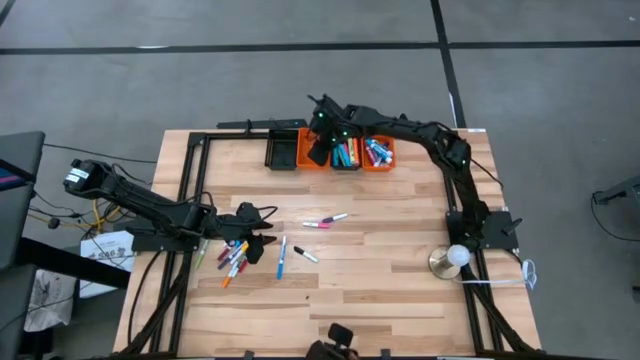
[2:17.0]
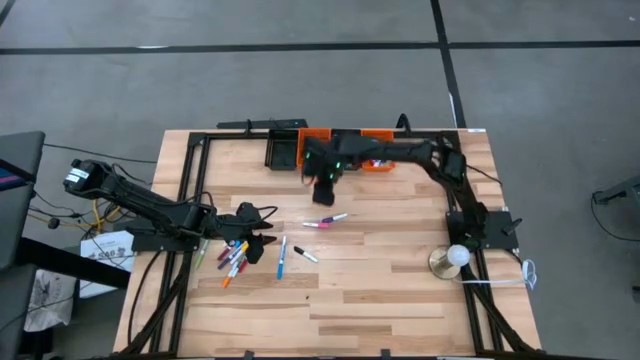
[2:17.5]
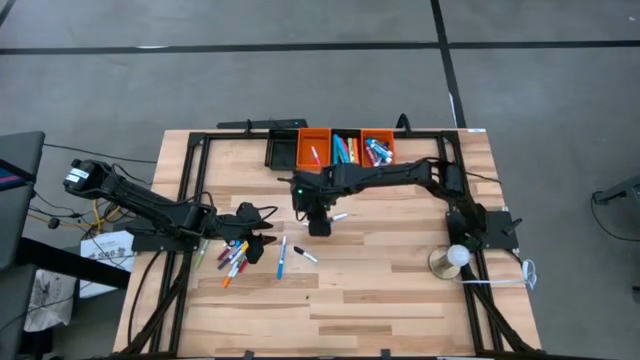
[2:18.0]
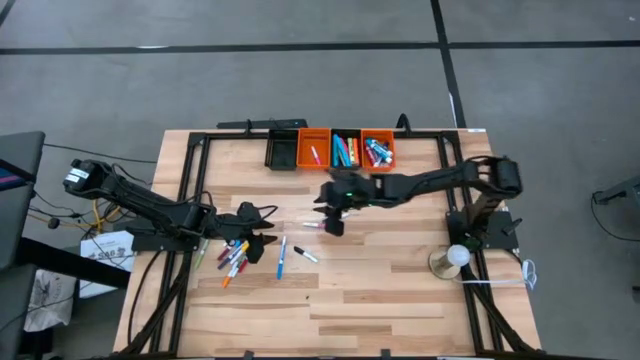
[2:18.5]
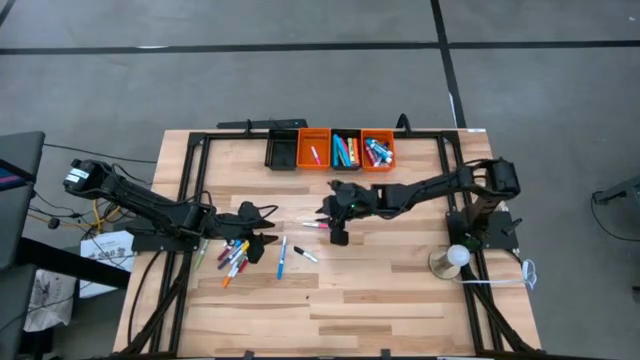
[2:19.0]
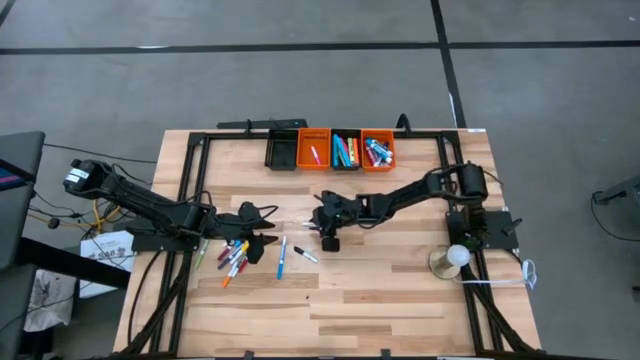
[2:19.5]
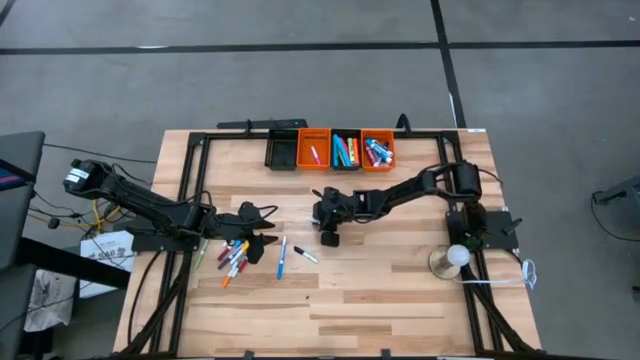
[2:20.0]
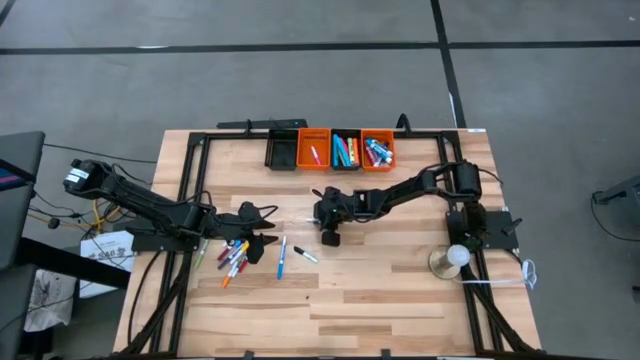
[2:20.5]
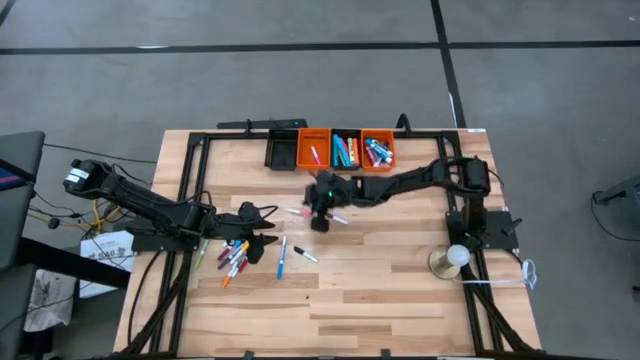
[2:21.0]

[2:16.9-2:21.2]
Task: Pick & Place Markers
Put the white pink highlighter pen into the left orange bin

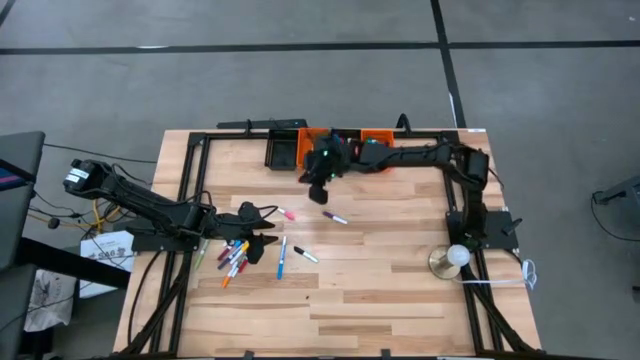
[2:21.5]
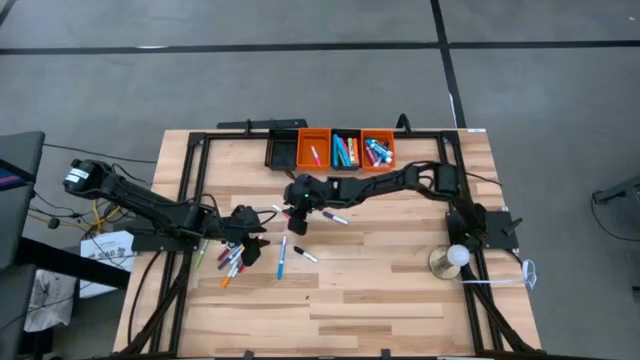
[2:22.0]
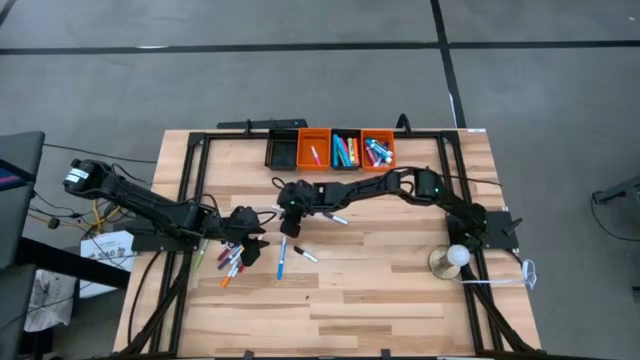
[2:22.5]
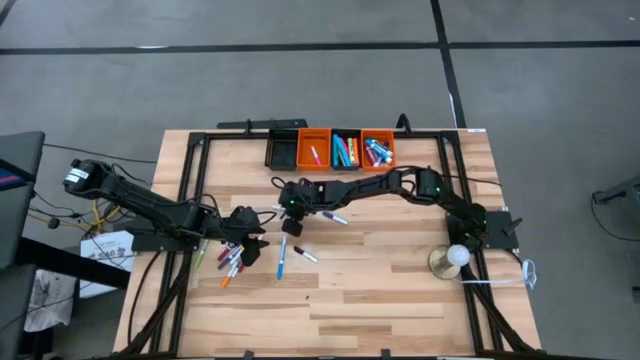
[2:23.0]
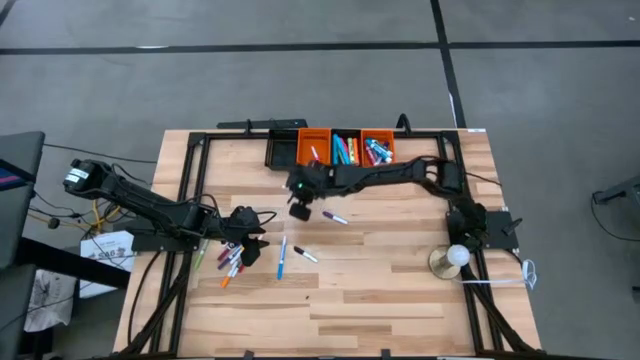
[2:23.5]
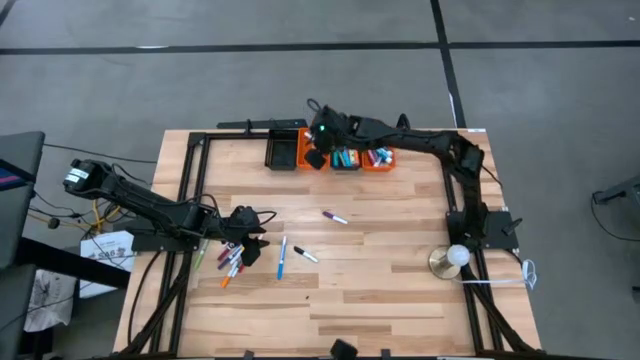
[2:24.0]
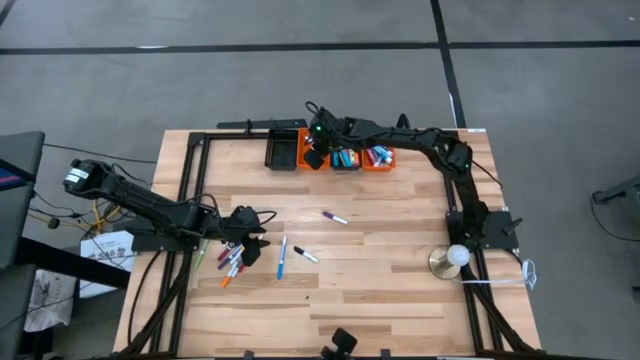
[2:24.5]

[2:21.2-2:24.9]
Put the white pink highlighter pen into the left orange bin

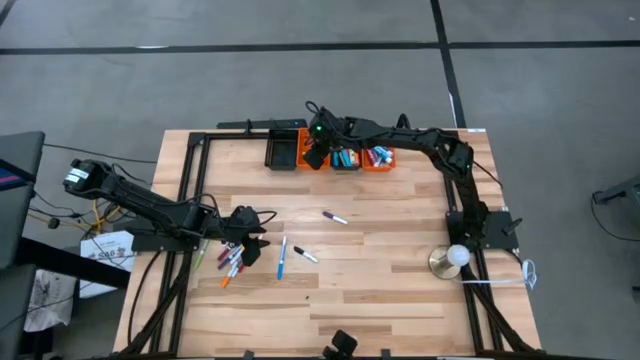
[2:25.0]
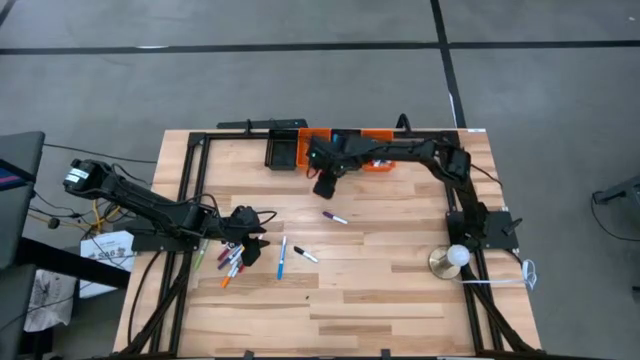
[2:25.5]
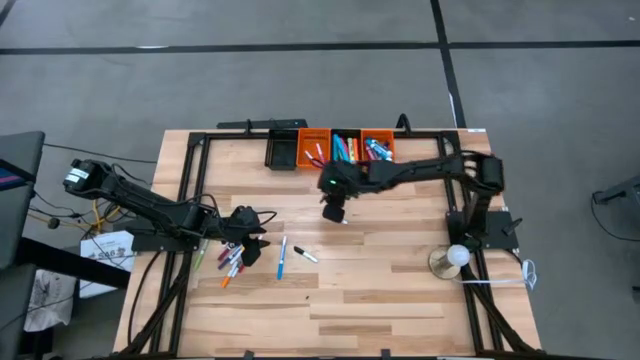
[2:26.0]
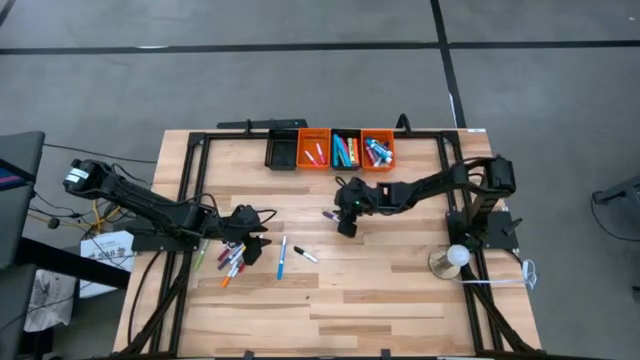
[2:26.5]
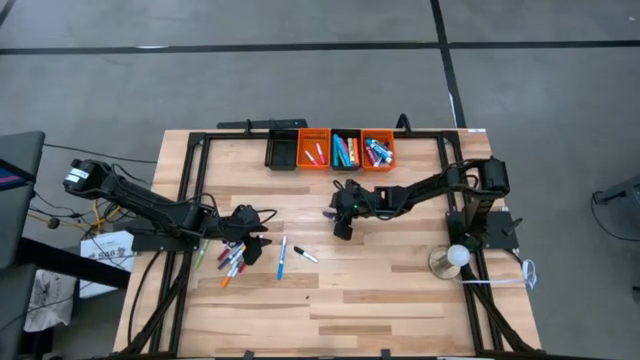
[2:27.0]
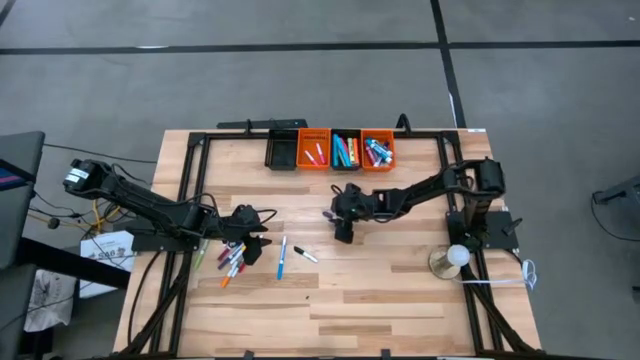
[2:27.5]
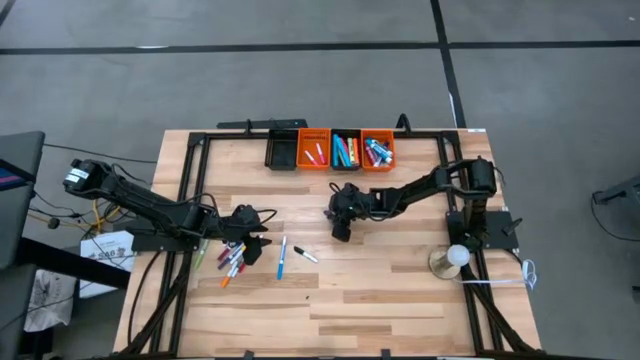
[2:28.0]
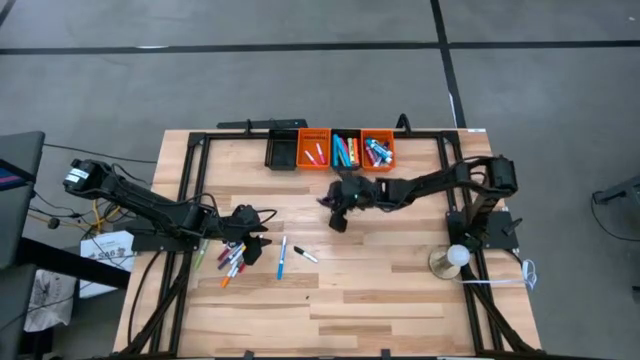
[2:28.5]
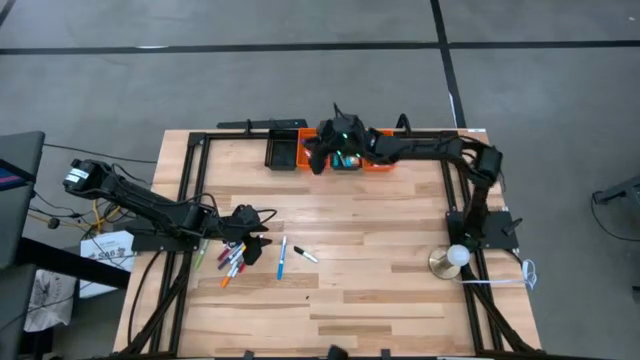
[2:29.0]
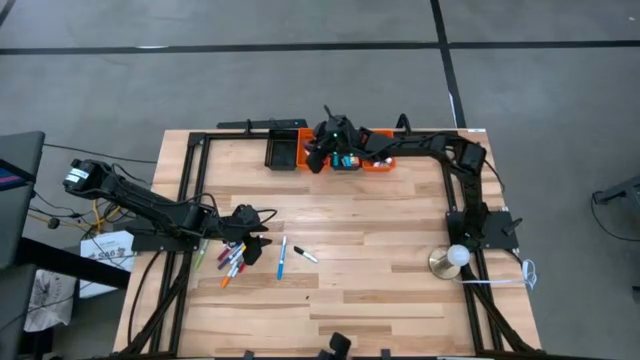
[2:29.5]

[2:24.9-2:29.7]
Put the white blue highlighter pen into the left orange bin

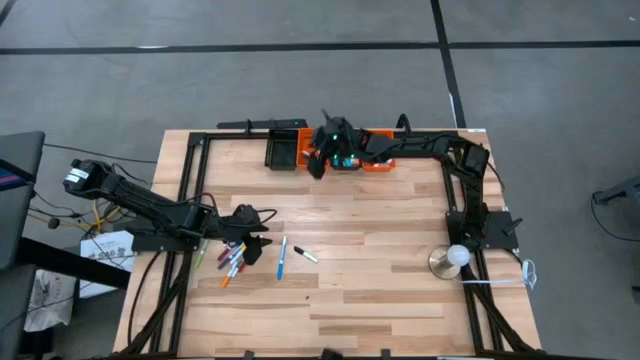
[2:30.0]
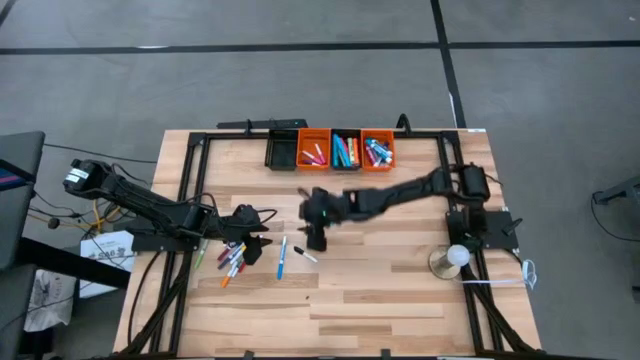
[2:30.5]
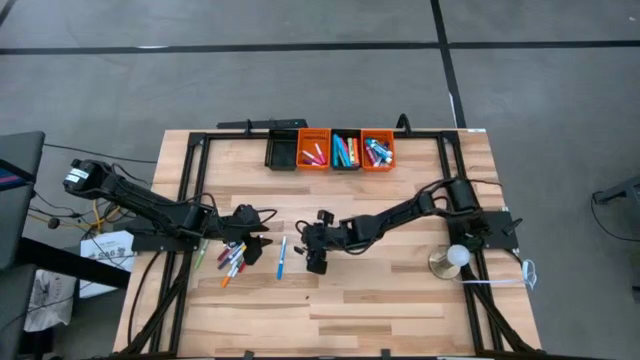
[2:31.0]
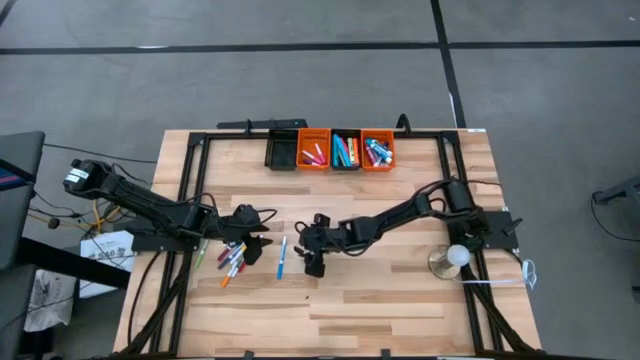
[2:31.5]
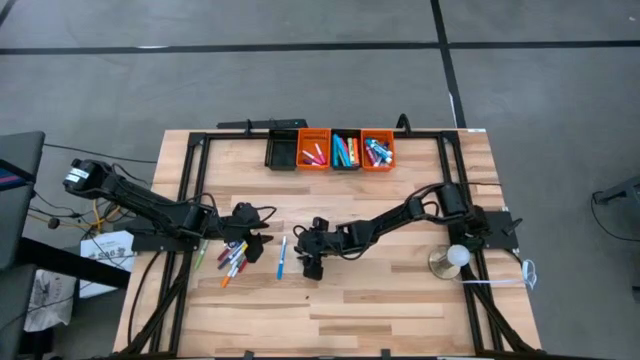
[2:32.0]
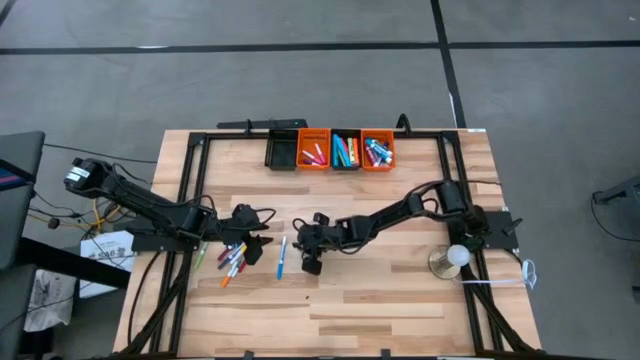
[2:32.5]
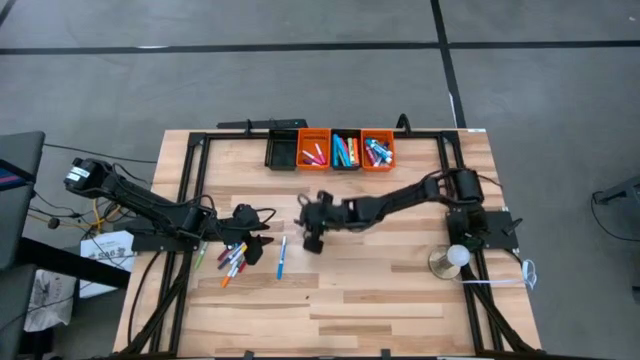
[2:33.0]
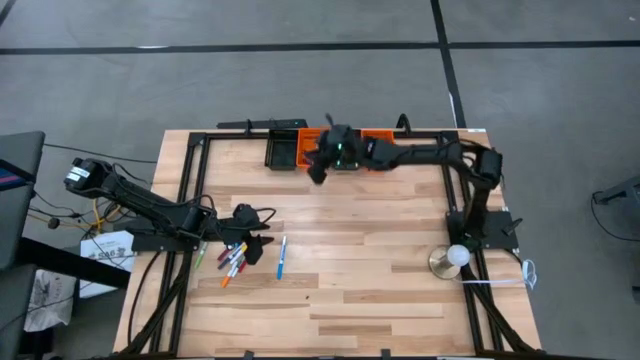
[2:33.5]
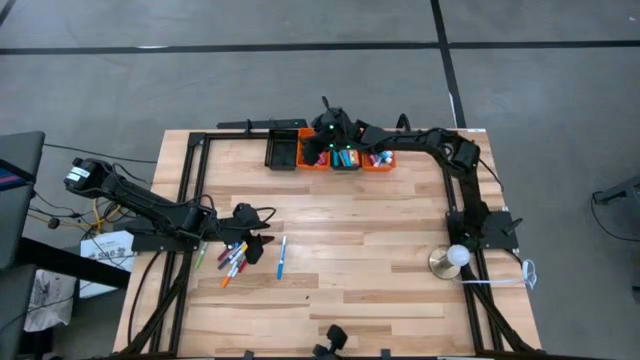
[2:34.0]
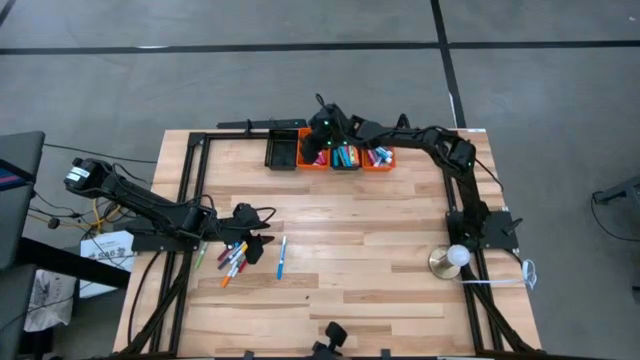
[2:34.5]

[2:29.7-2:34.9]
Put the white black highlighter pen into the left orange bin

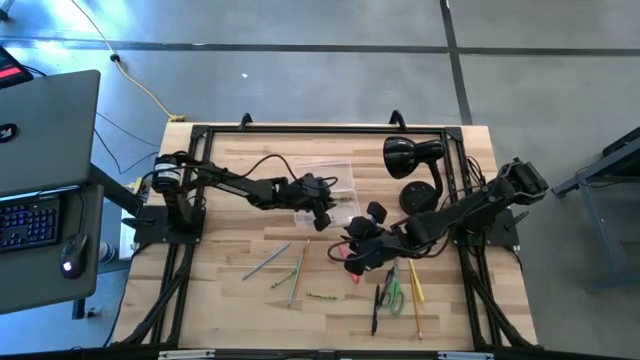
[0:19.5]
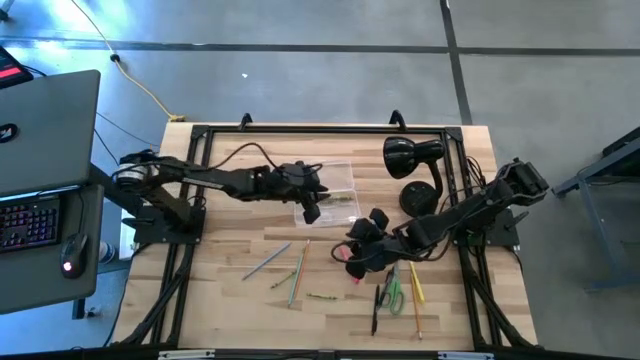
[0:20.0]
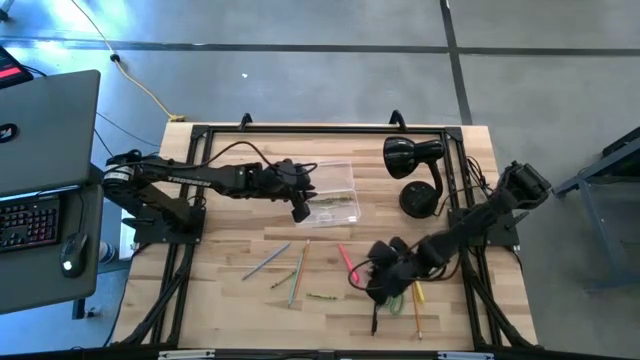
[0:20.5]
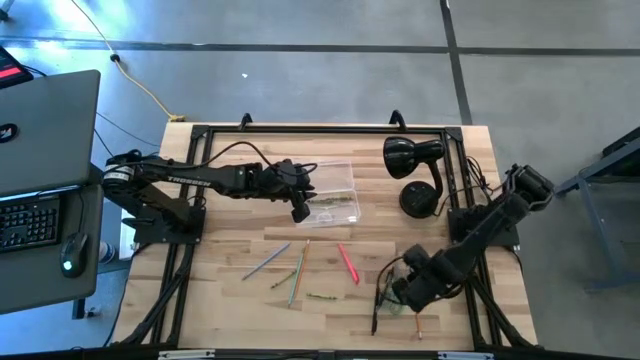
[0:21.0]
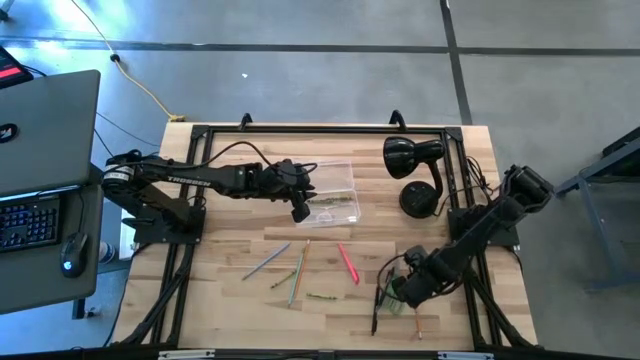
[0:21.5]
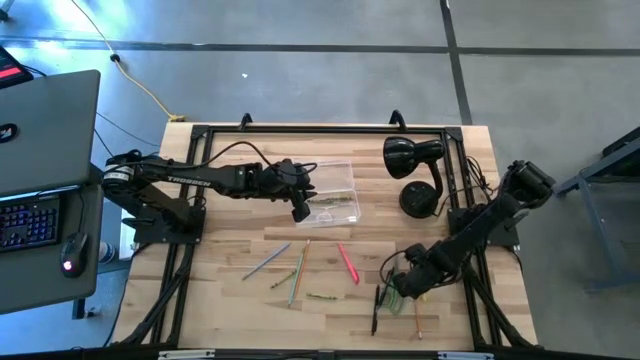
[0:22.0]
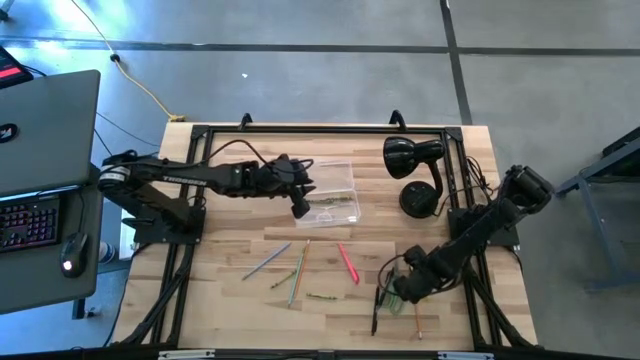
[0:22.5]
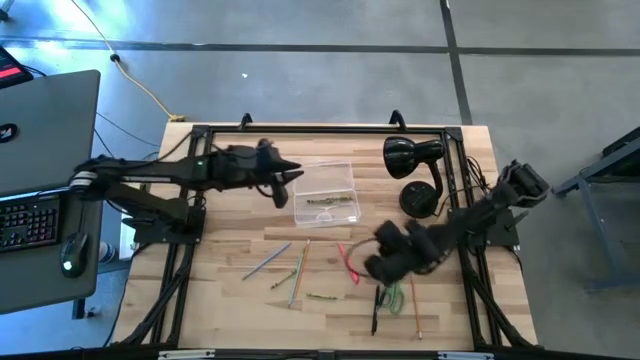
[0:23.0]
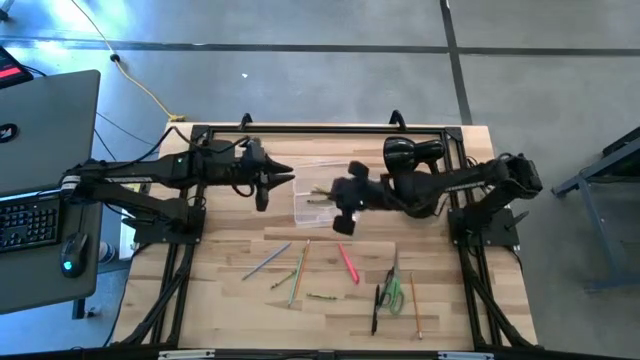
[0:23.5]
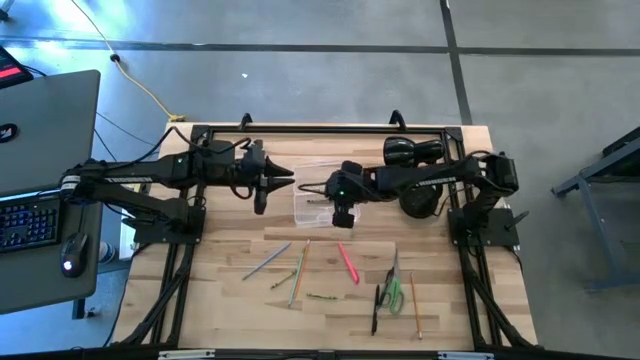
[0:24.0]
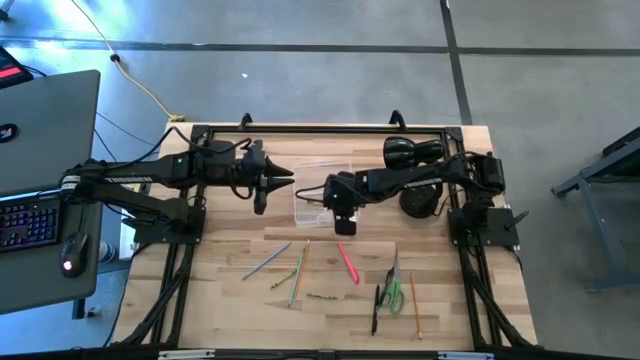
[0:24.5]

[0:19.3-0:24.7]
Task: Pick & place school supplies into a supply box
Put the yellow pen into the transparent supply box
